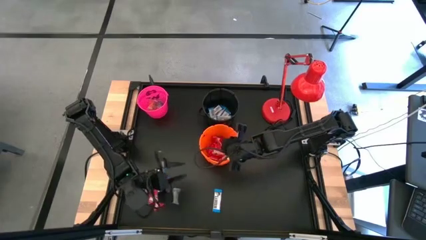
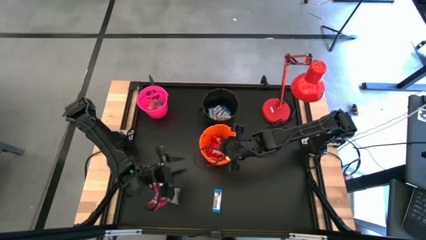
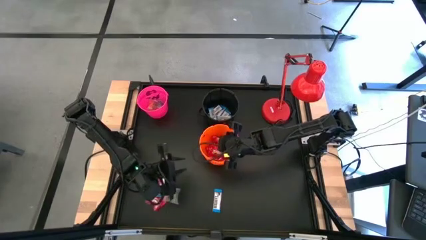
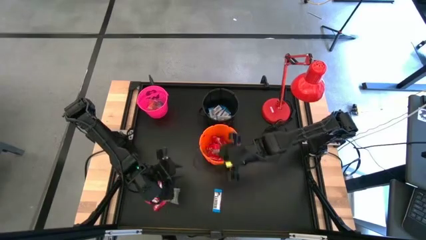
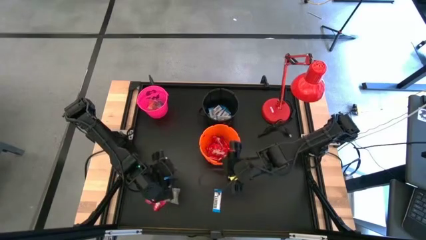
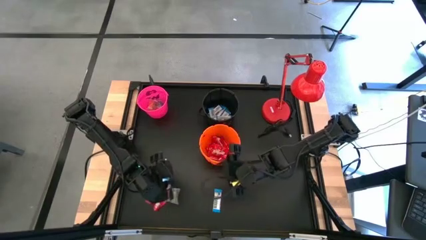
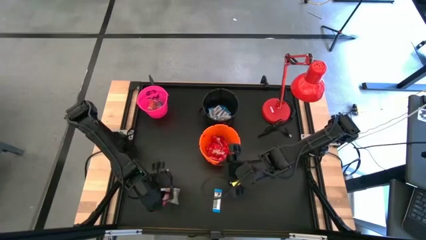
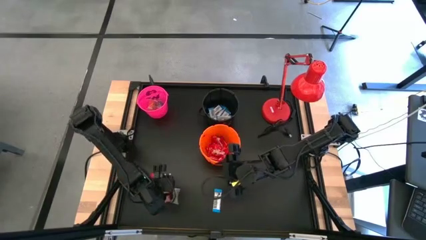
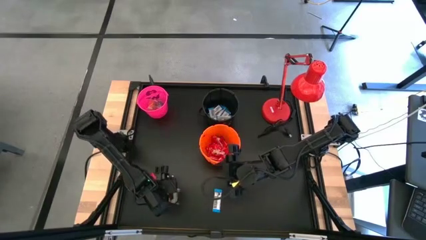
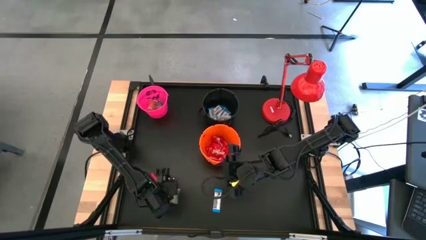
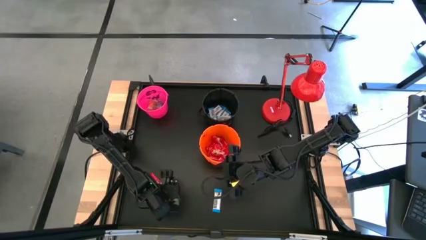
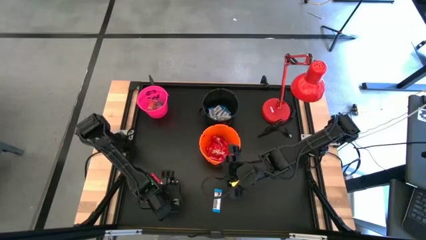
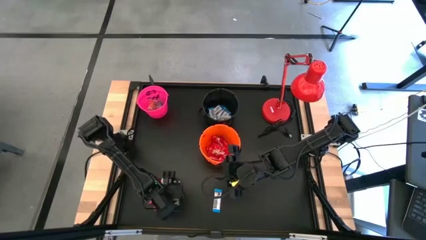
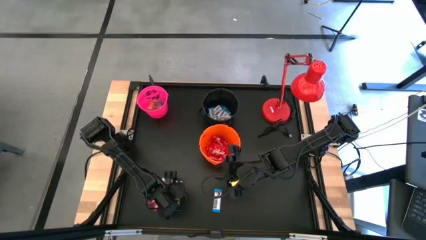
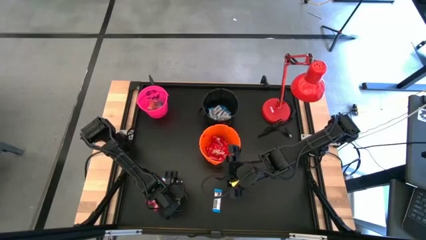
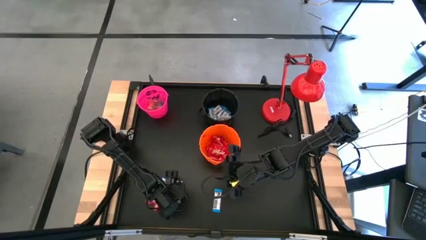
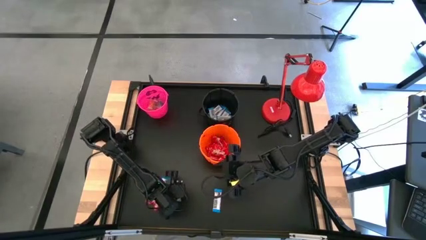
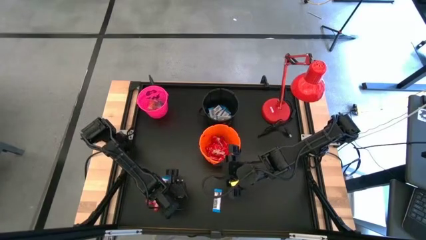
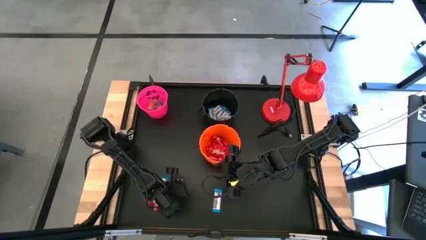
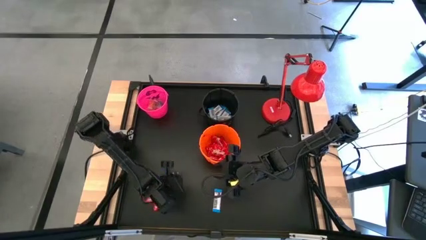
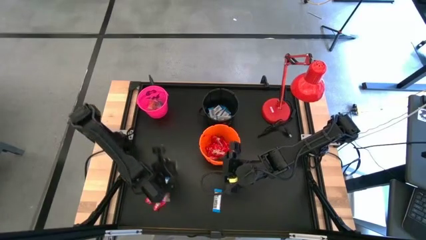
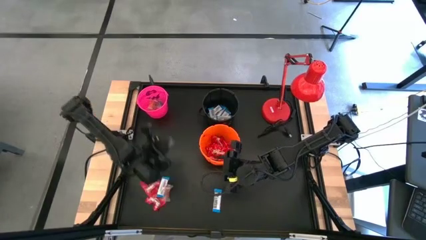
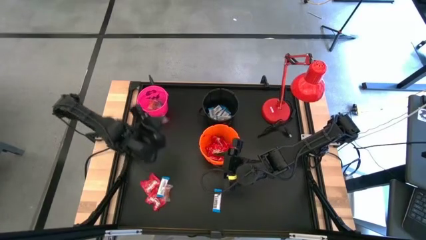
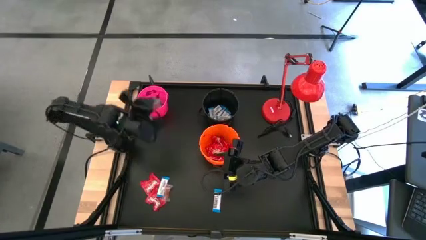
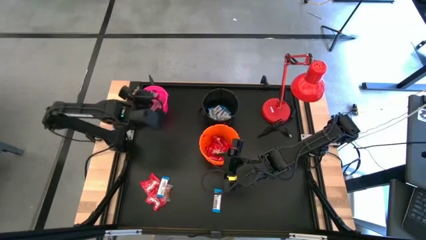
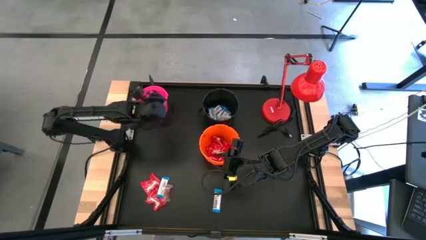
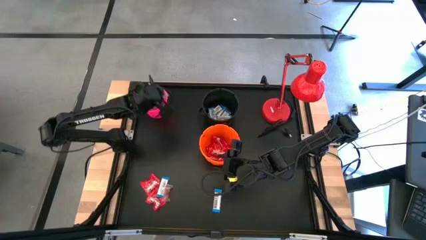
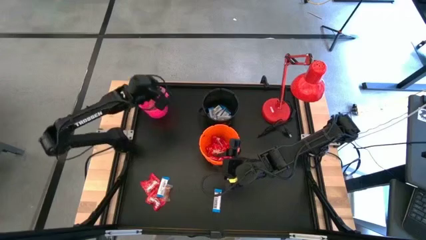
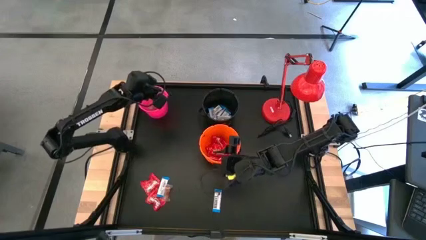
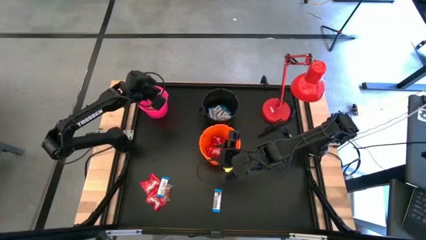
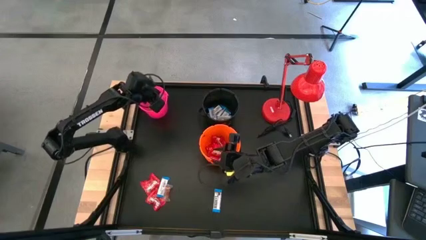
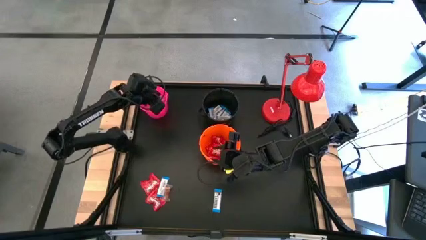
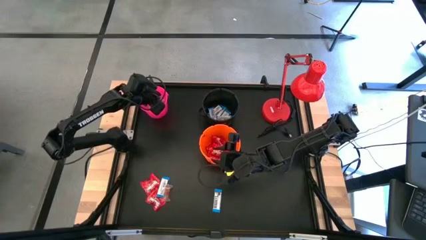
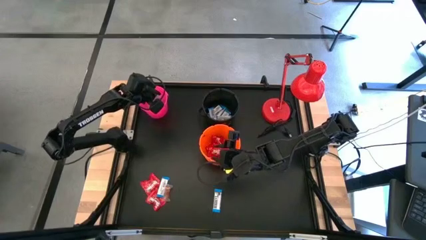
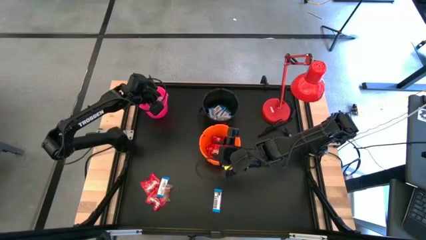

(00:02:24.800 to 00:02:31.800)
Task: Sort candy
Put the green gummy into the pink bucket

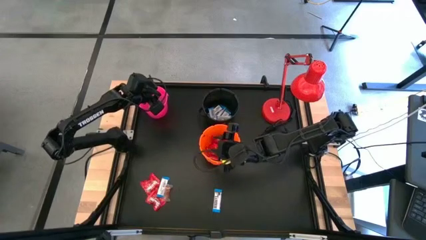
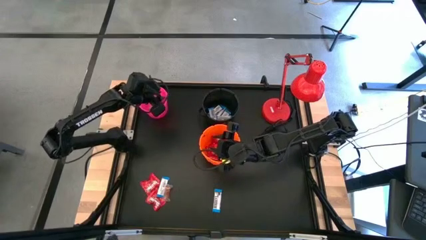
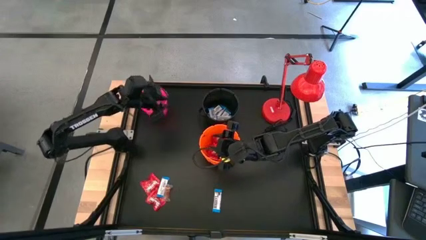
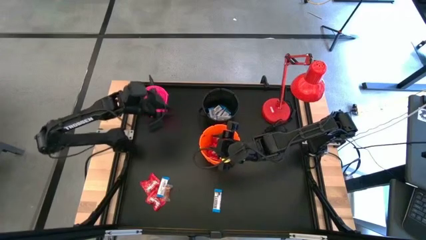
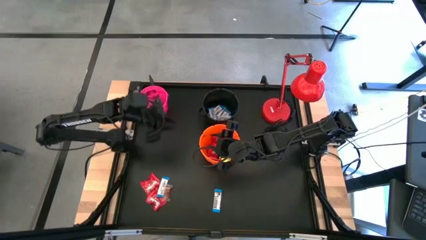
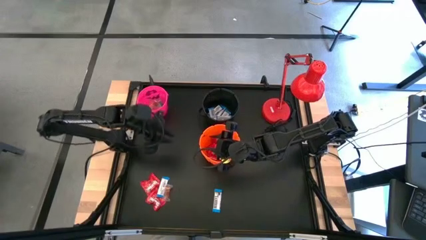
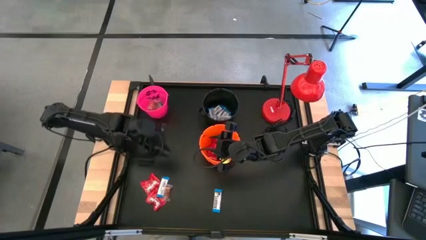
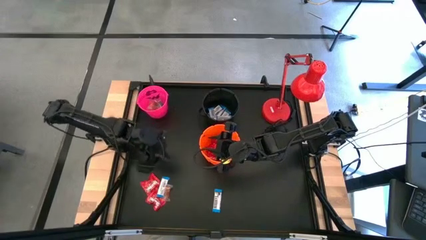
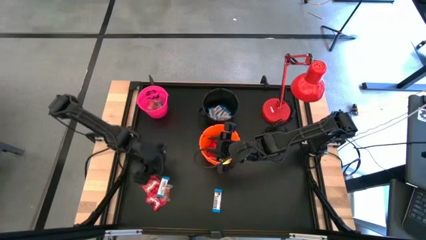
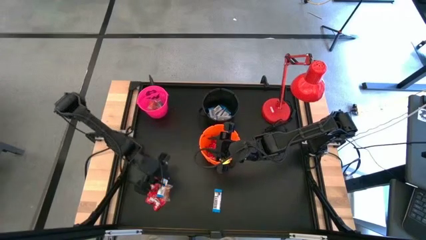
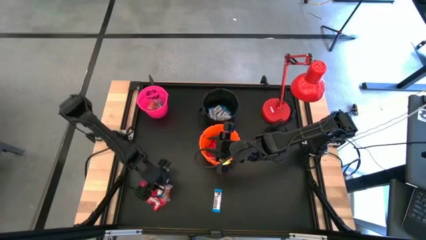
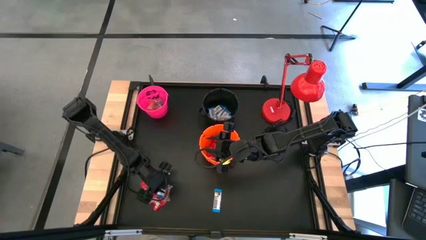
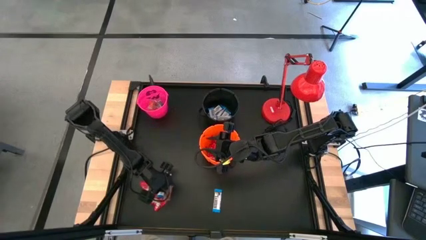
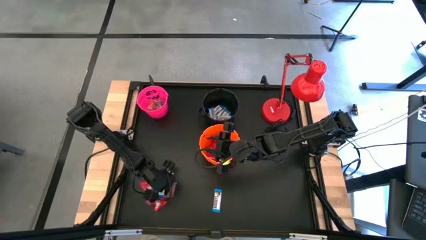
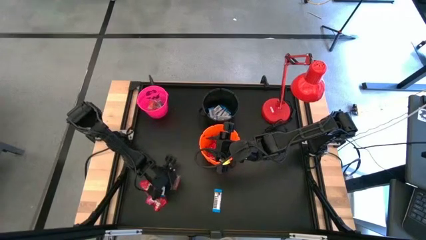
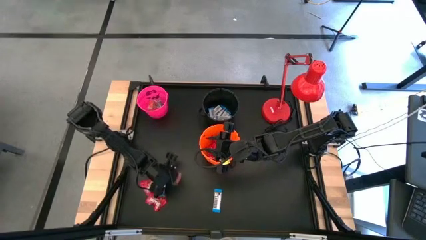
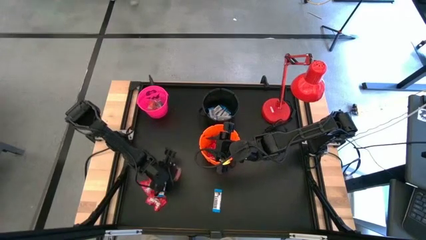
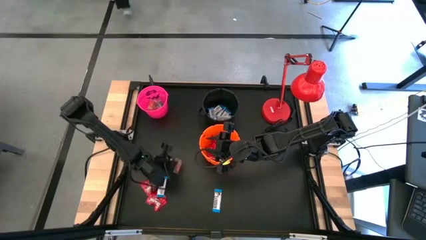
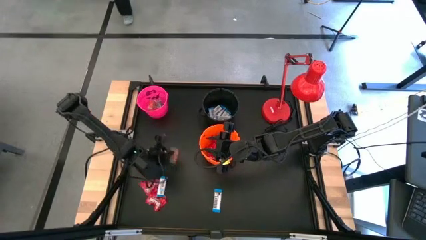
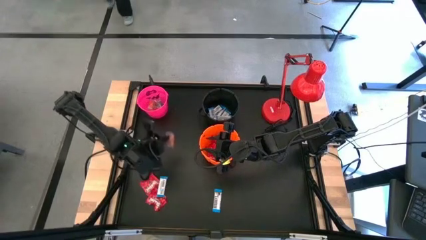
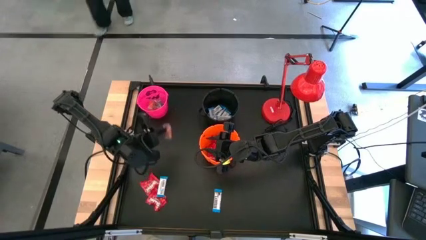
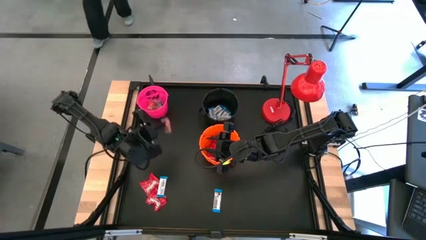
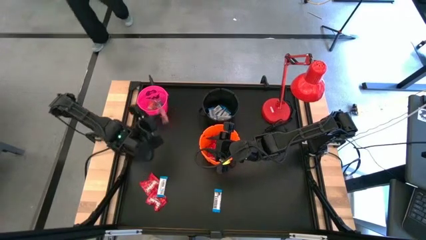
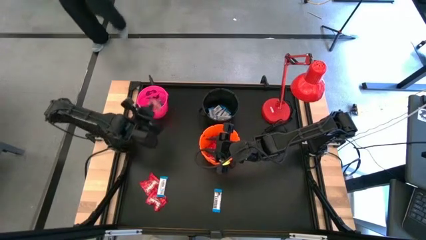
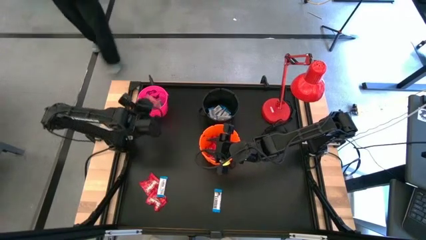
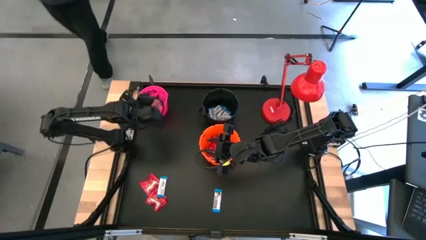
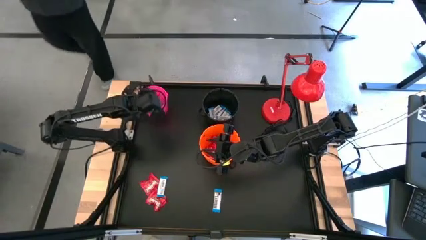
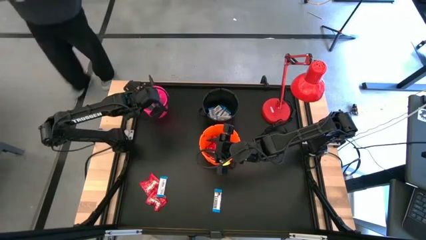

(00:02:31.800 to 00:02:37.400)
Put the bottom left transparent candy into the pink bucket

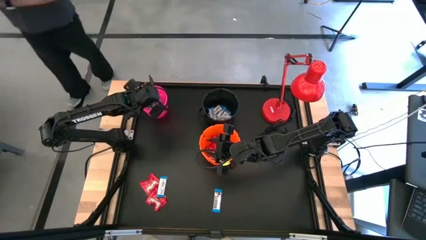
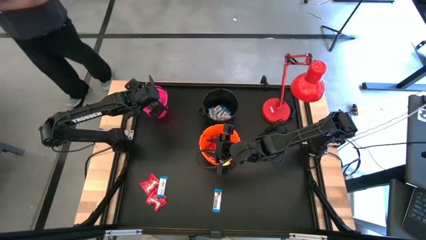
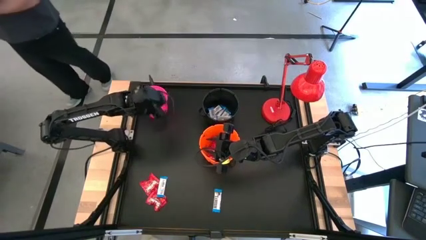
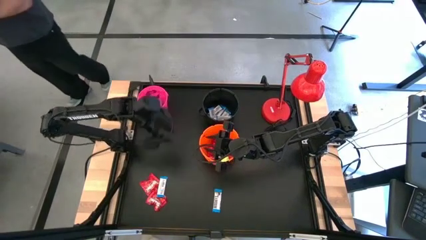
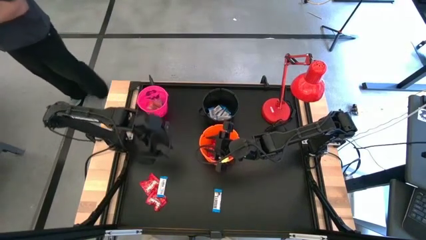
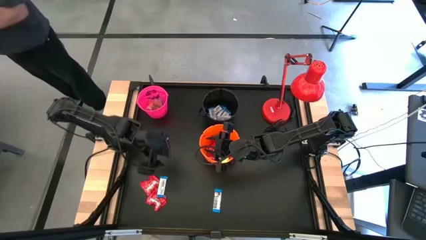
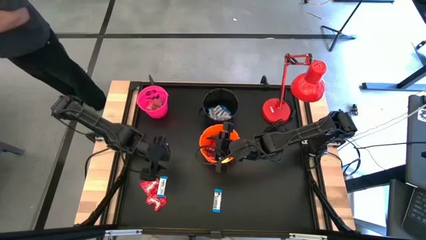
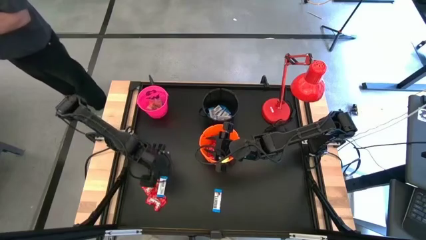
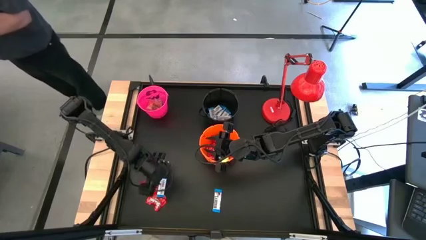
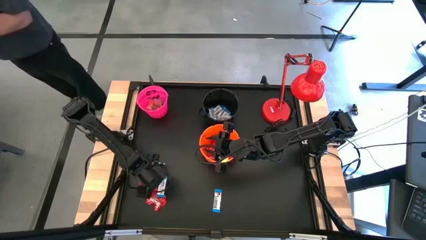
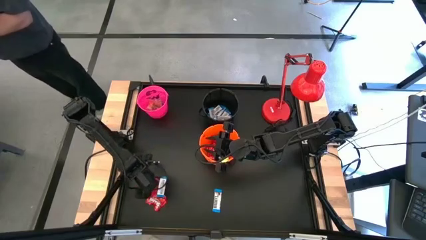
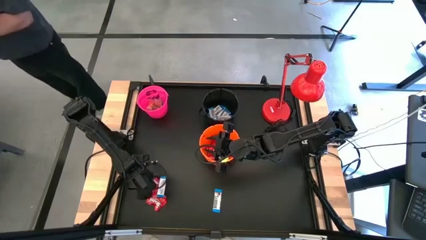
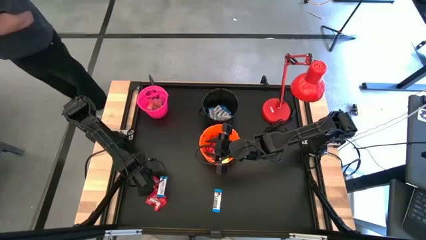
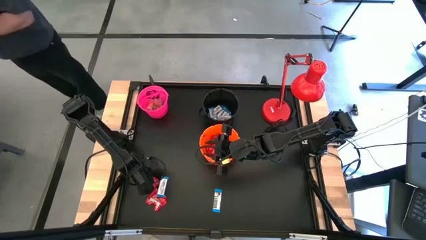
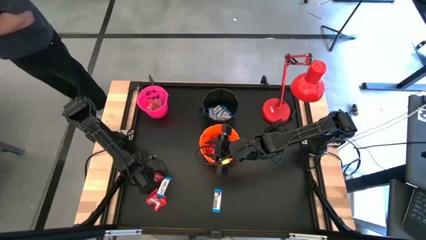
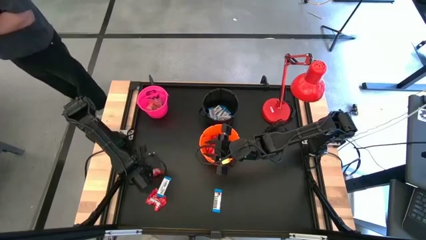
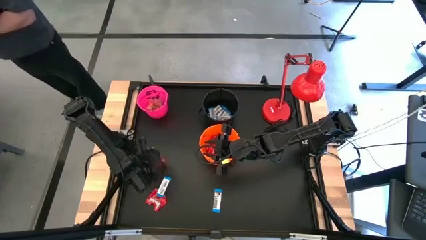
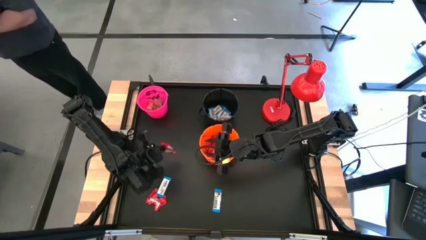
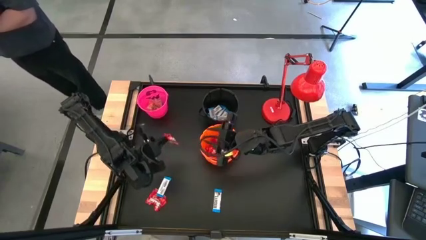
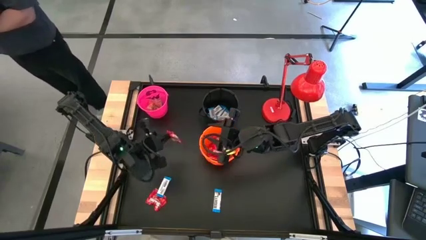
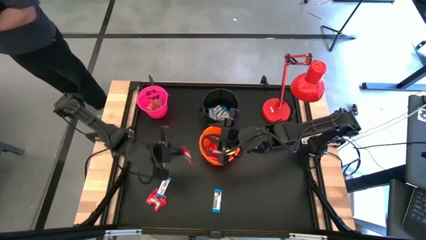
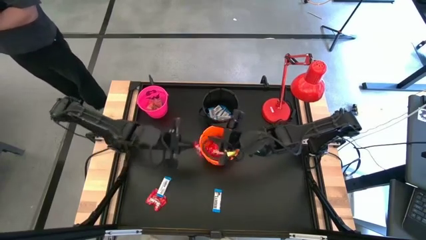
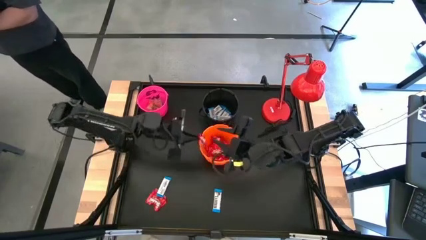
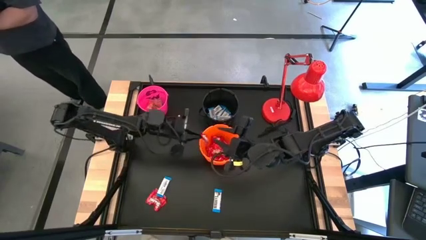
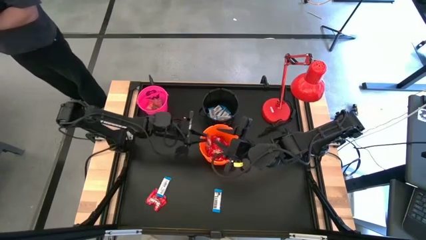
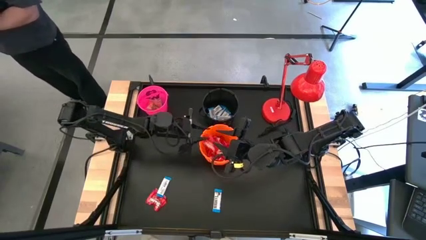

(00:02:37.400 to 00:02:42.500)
Put the red candy into the orange bucket
